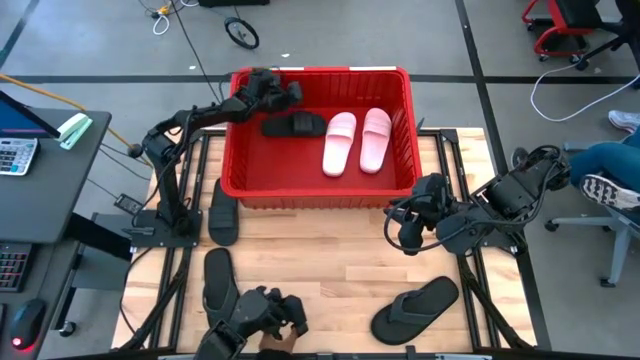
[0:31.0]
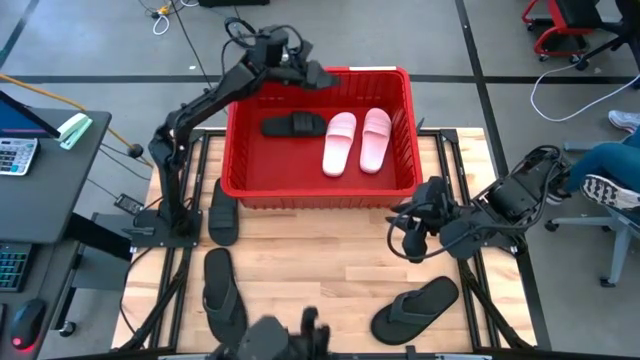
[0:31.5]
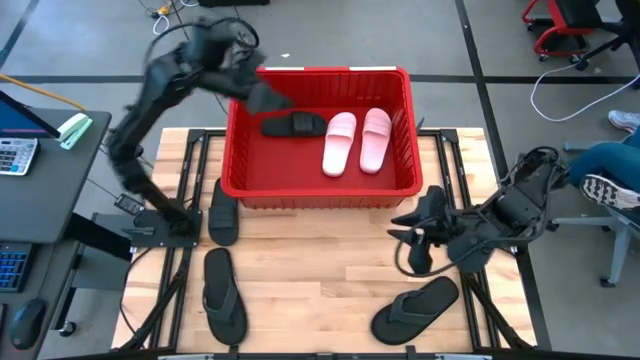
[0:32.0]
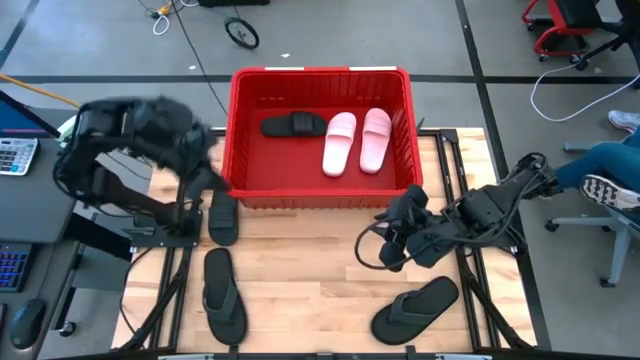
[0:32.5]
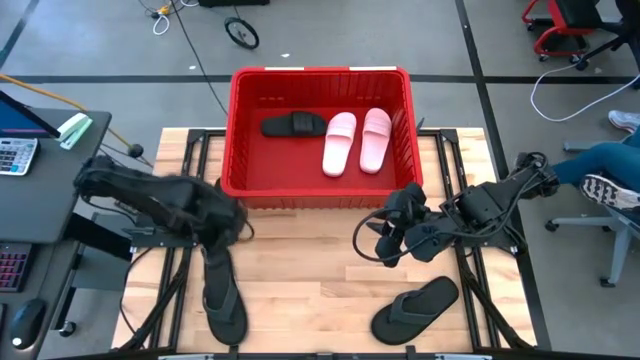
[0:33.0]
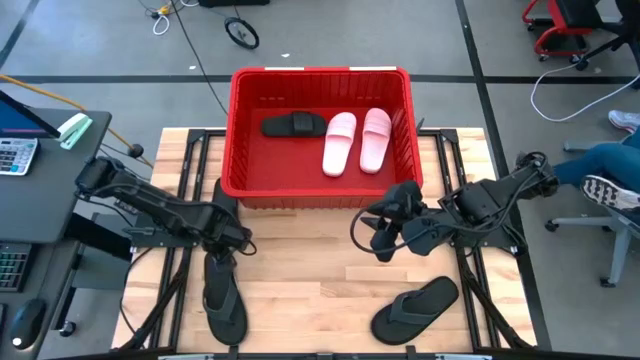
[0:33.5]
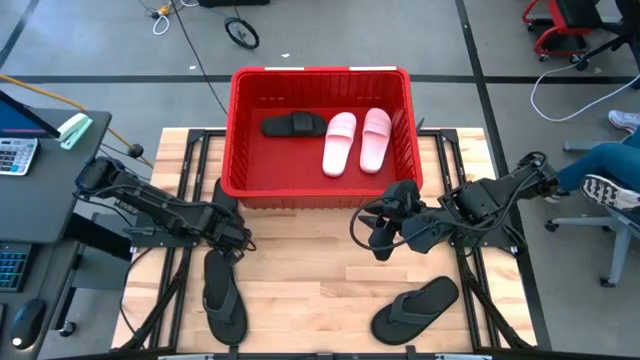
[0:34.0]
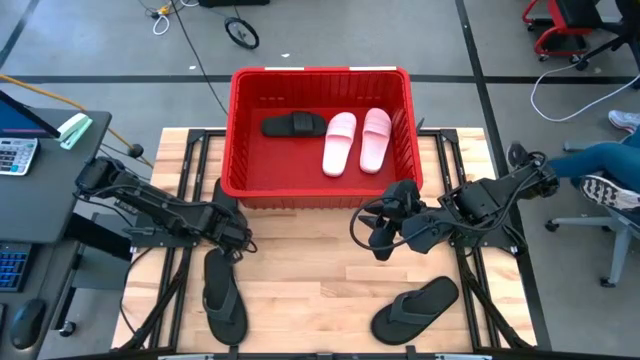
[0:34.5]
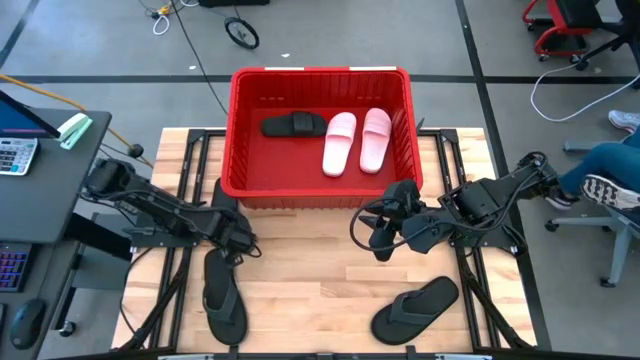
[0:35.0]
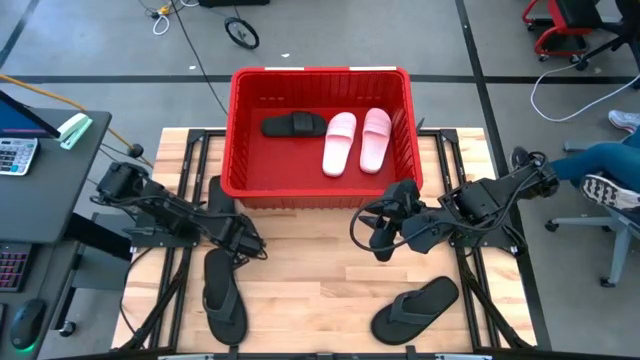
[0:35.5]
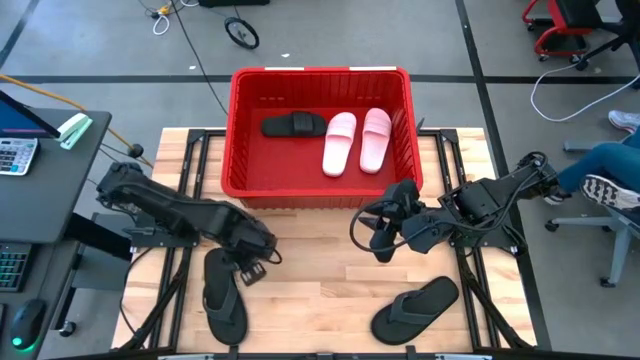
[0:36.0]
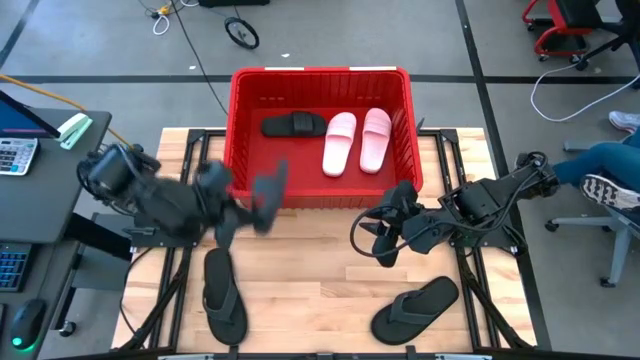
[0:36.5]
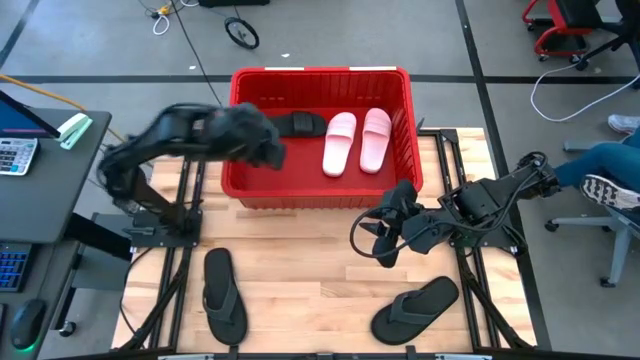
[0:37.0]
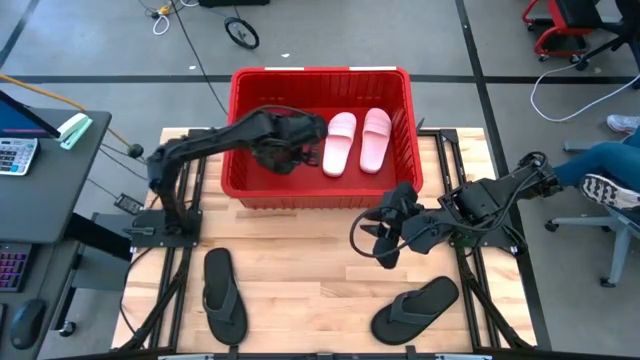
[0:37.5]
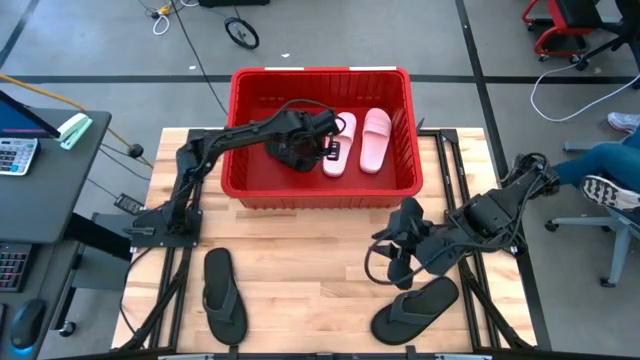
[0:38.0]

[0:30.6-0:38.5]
Task: Pick and place slides into bin
Put the black slipper into the red bin

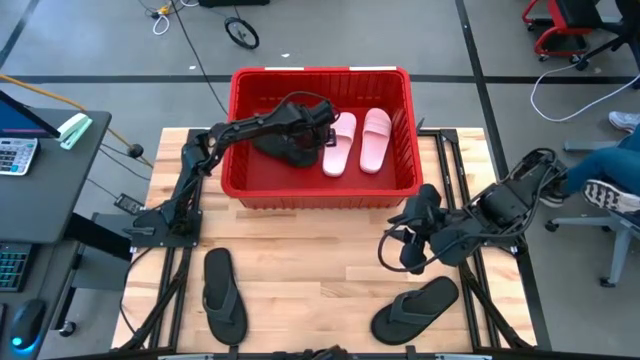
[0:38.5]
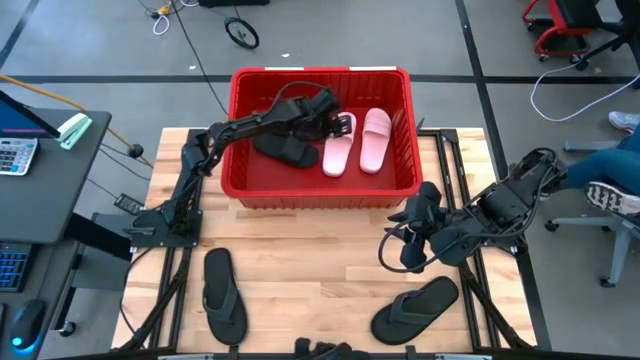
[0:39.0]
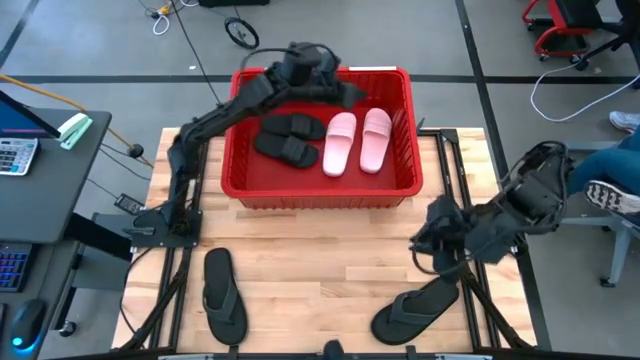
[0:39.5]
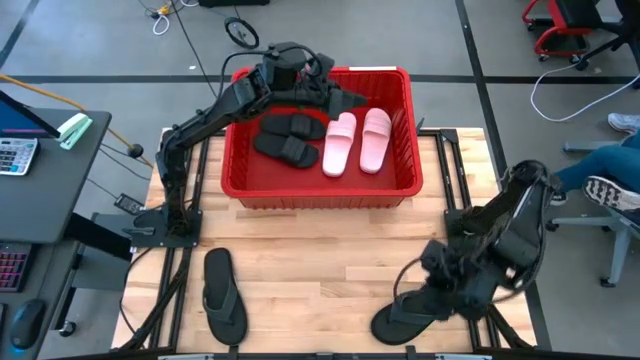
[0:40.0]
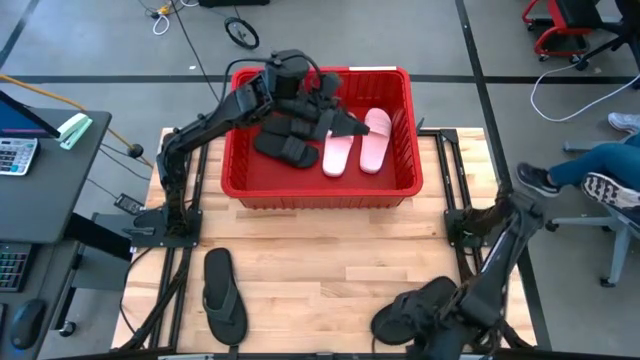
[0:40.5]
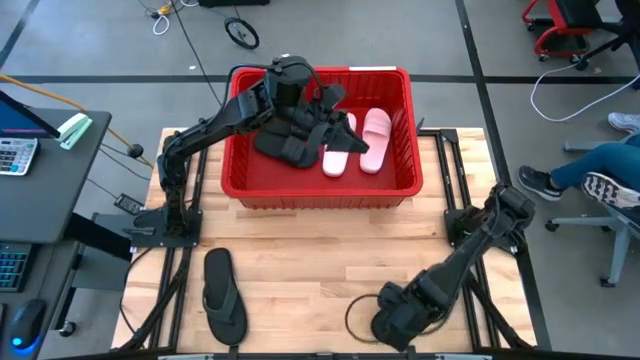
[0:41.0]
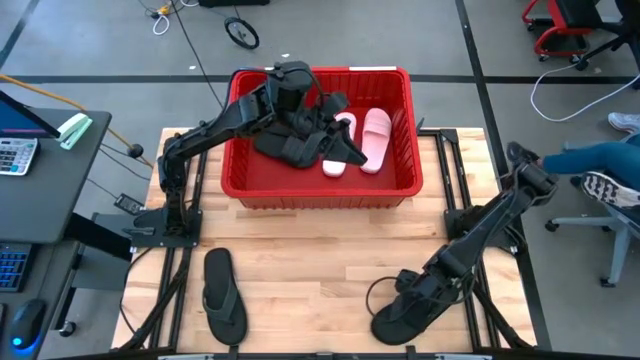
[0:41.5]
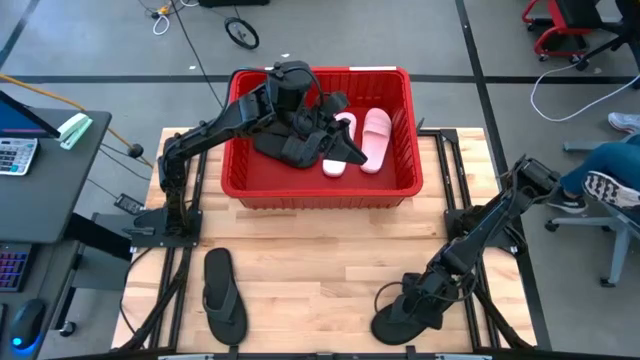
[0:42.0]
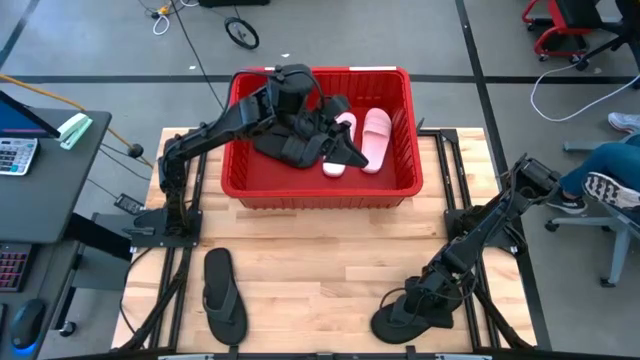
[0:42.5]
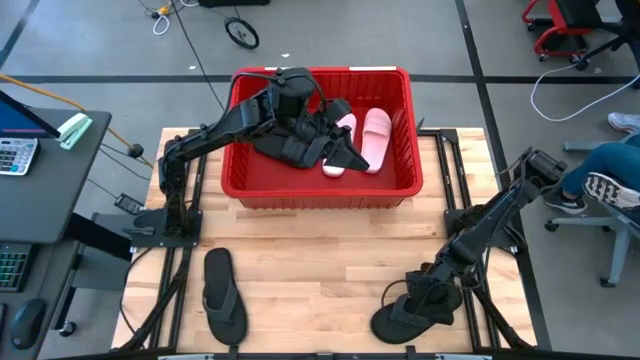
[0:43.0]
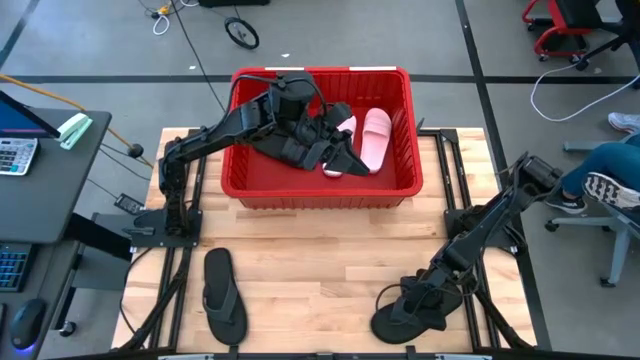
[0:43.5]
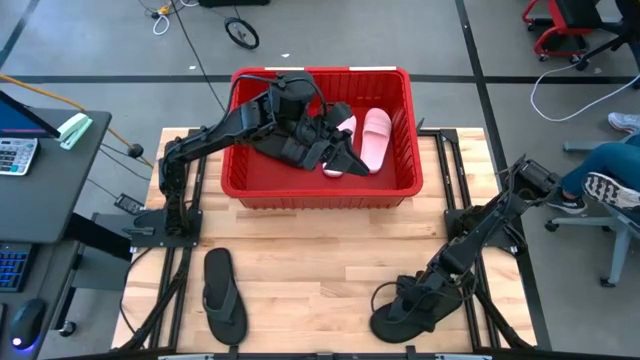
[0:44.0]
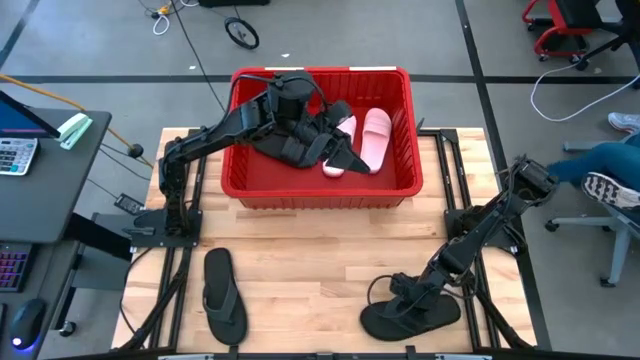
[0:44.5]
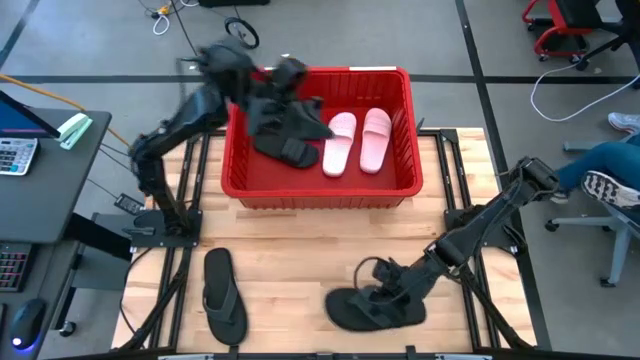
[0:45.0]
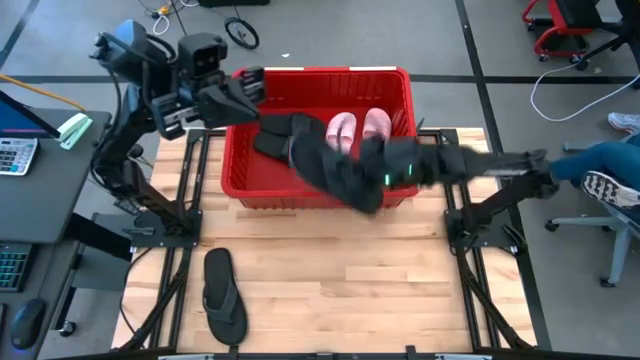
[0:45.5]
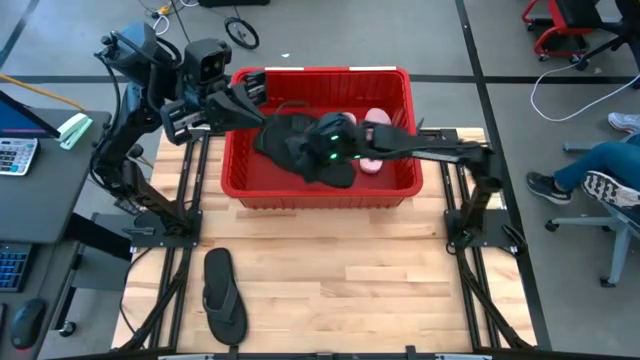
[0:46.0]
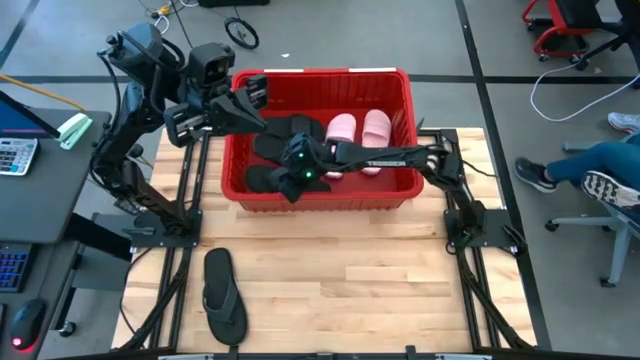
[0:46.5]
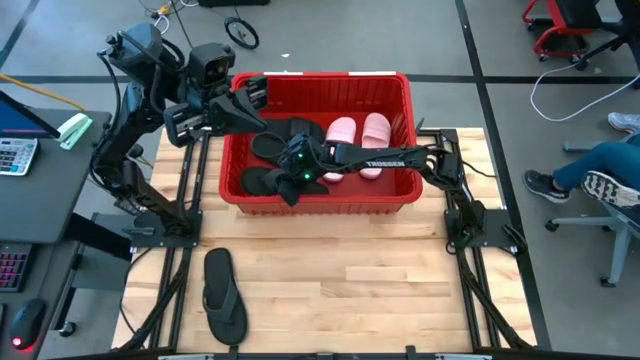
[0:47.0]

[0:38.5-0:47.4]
Put the right black slides into the red bin

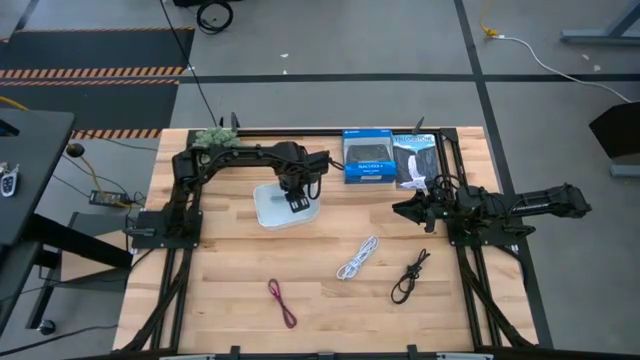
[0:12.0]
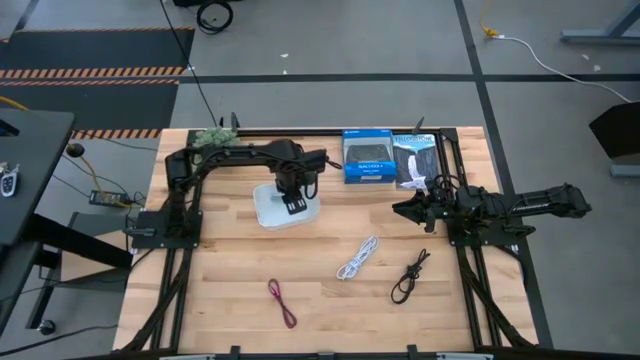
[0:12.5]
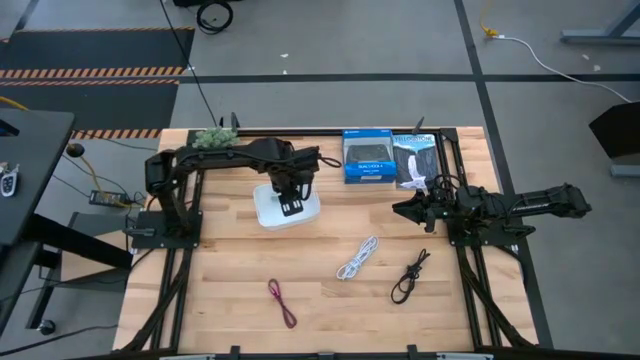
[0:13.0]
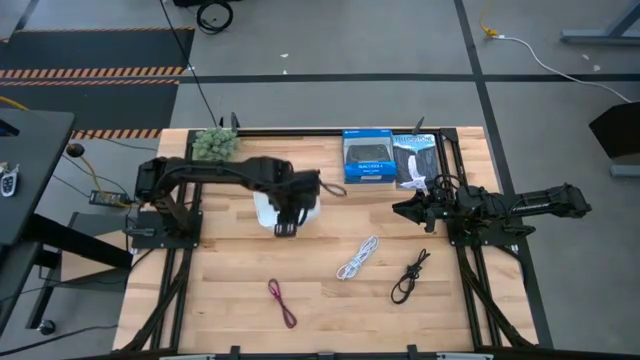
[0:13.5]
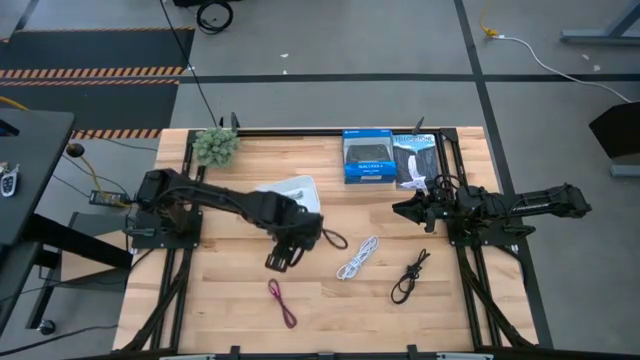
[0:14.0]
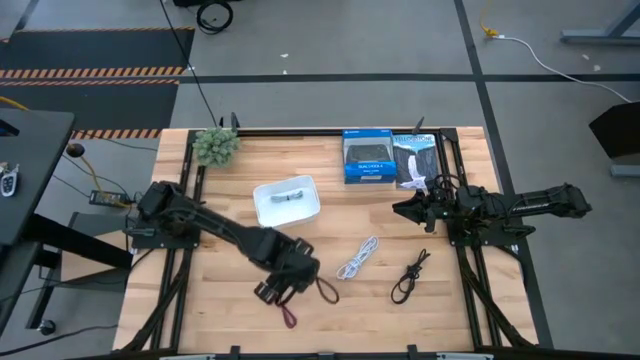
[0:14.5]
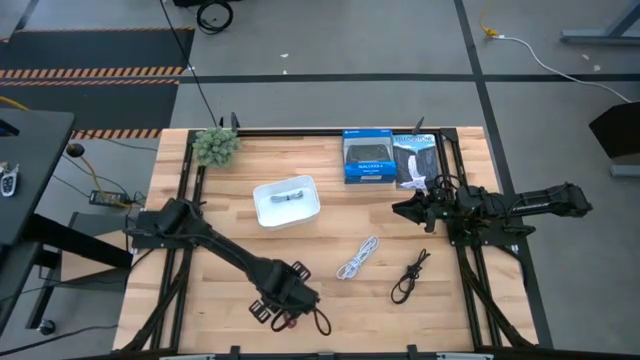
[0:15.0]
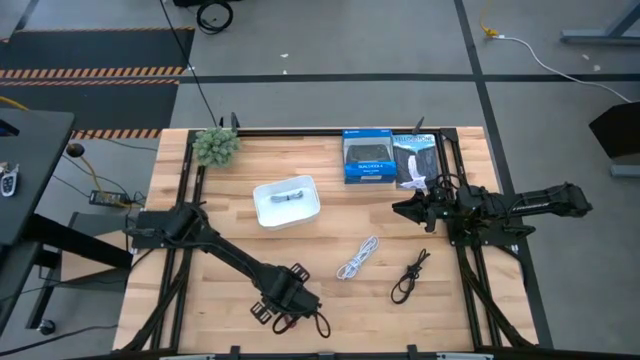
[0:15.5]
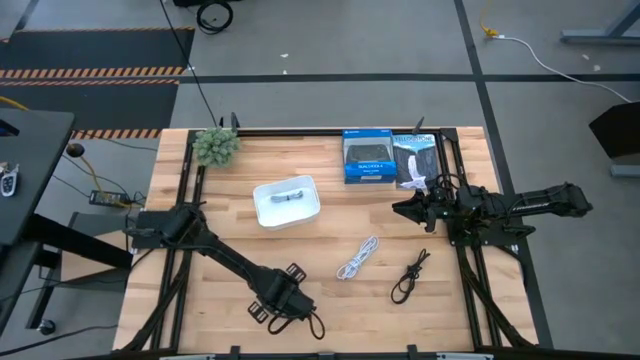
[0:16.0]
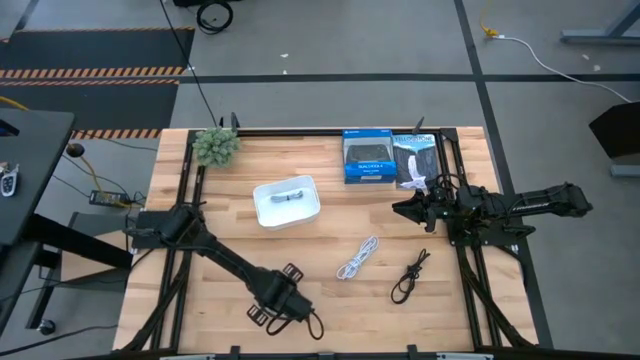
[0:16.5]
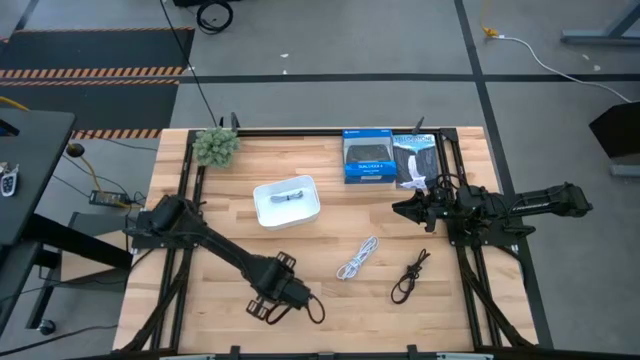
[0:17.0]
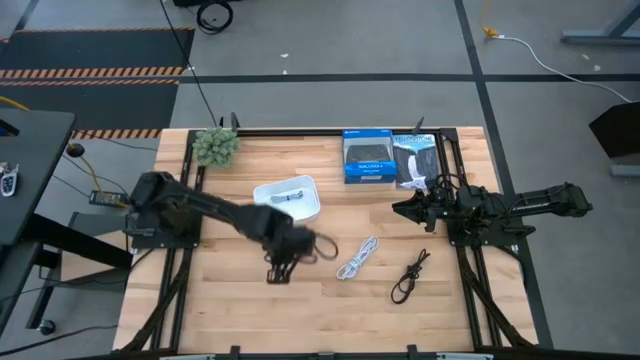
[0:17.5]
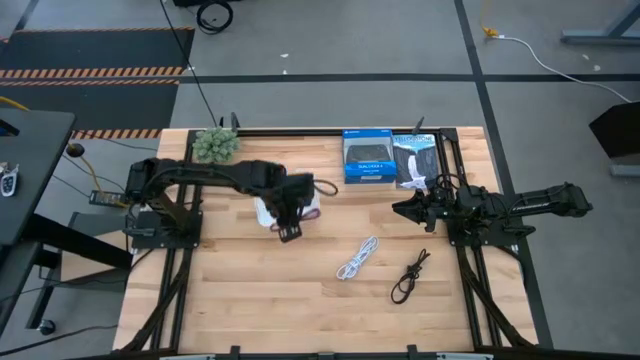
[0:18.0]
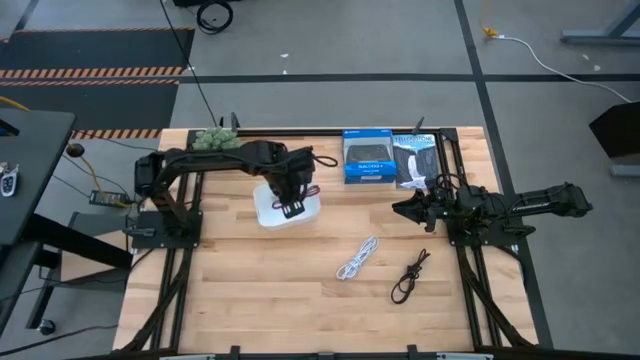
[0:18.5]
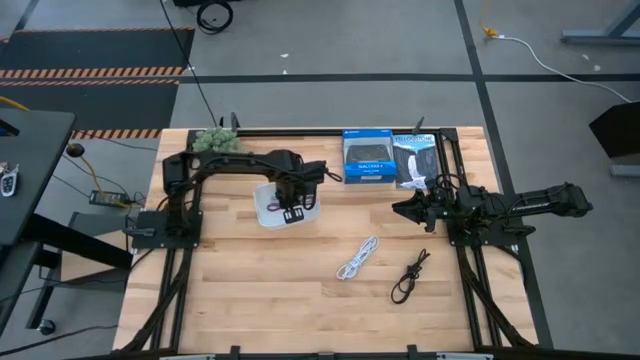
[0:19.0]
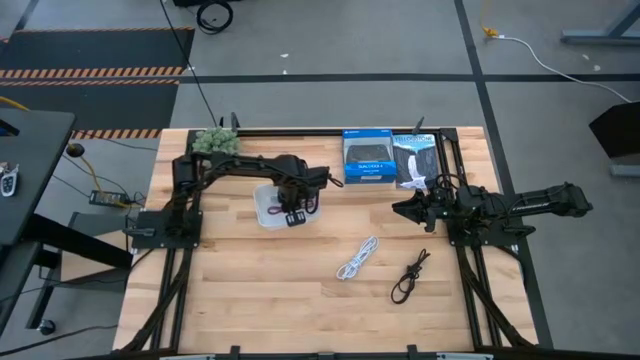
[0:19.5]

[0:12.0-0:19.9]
Task: Pick and place USB-C Cables
Put the pink cable charger into the white bin
